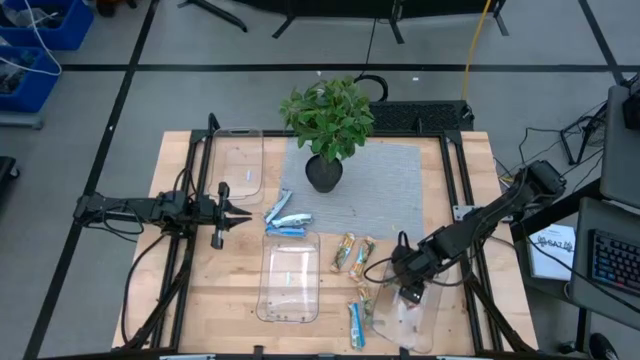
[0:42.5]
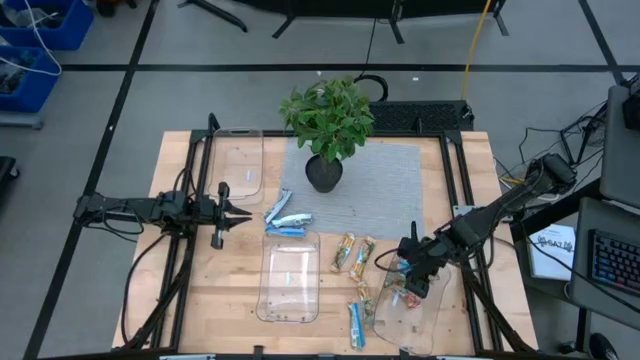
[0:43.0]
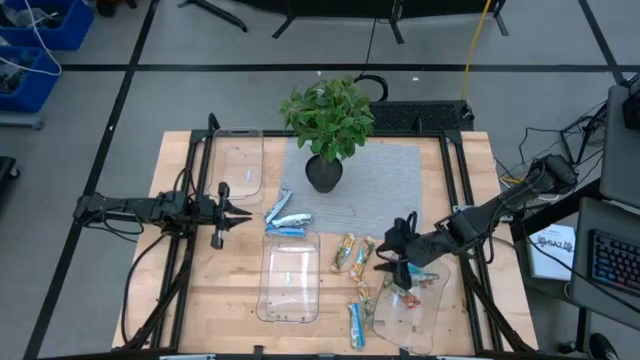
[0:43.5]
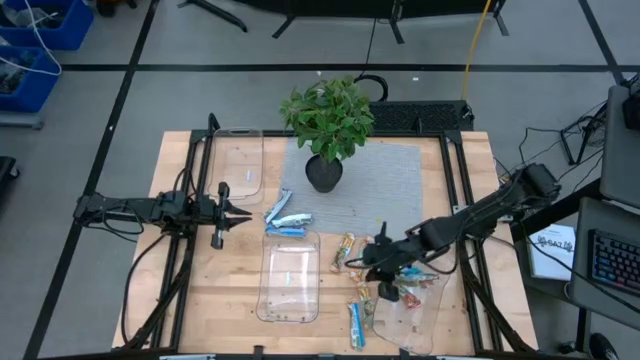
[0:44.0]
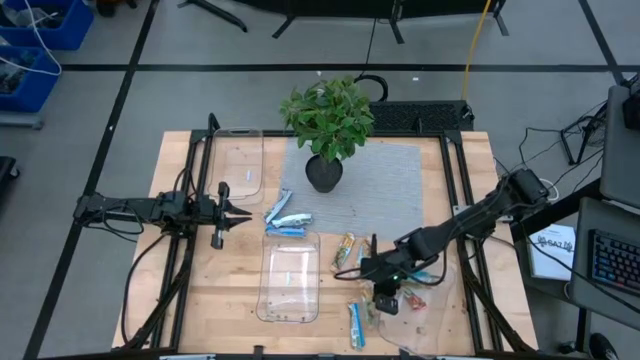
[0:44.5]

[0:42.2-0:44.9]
Task: Pick and place Granola Bars by type
Adjust the bottom right transparent bin on the table

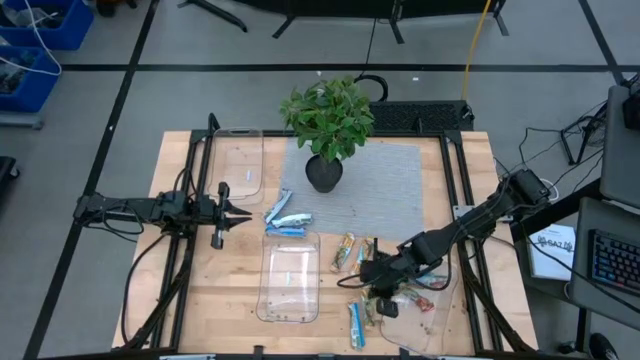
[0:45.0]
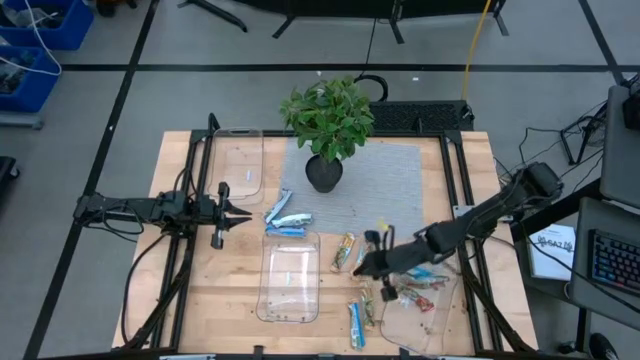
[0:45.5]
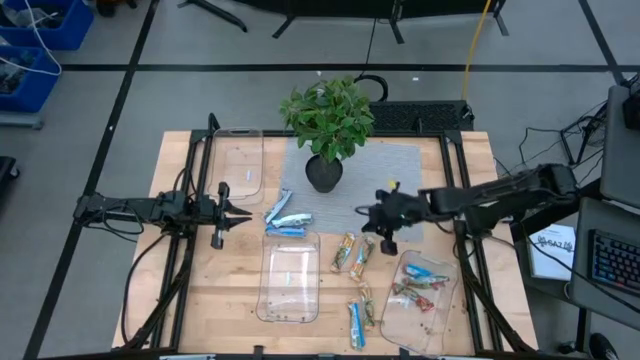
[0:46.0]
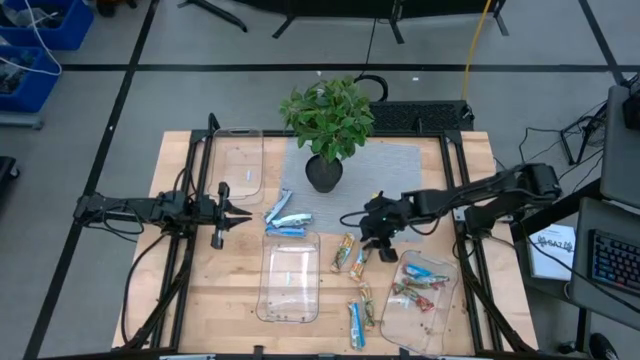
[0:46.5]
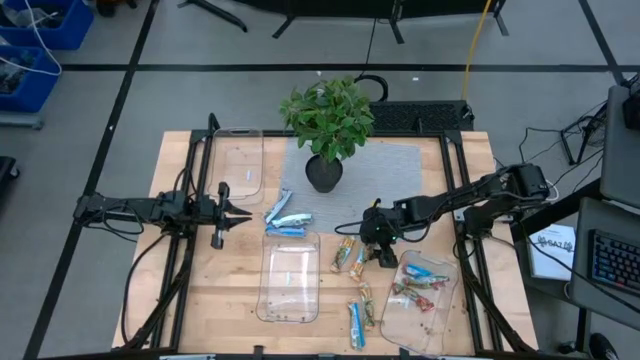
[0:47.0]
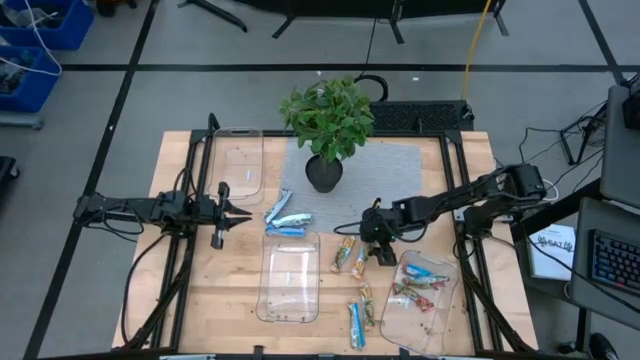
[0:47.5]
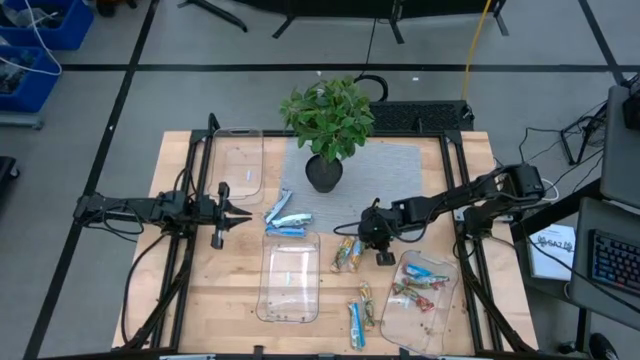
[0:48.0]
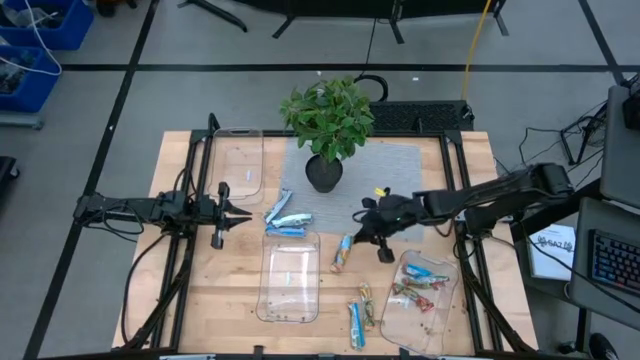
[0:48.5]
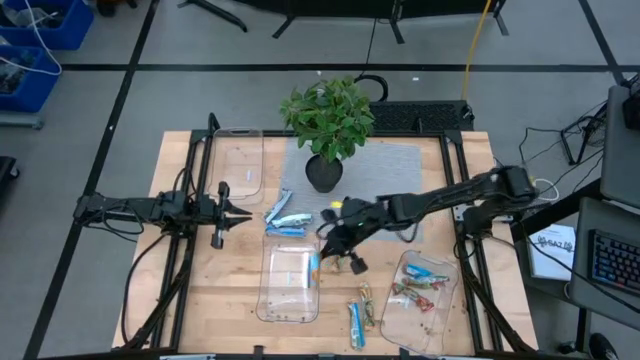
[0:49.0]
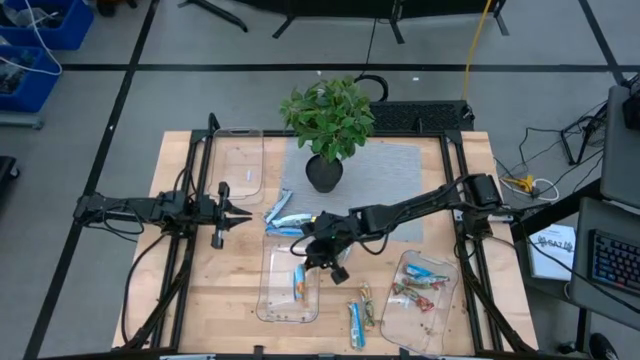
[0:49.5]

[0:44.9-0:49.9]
Put the yellow granola bar into the bottom left transparent bin

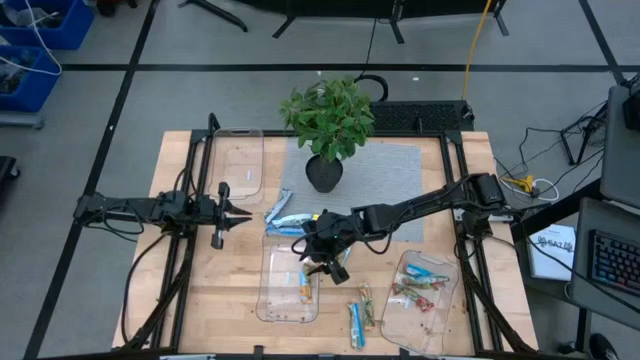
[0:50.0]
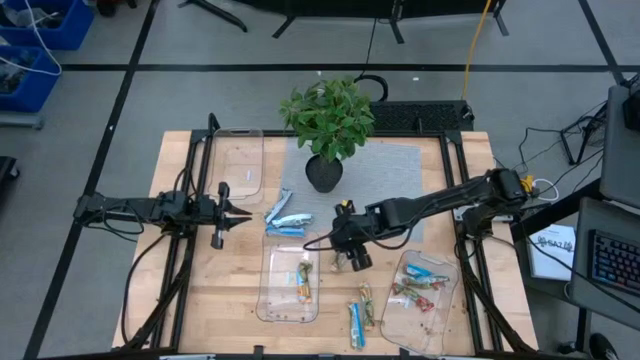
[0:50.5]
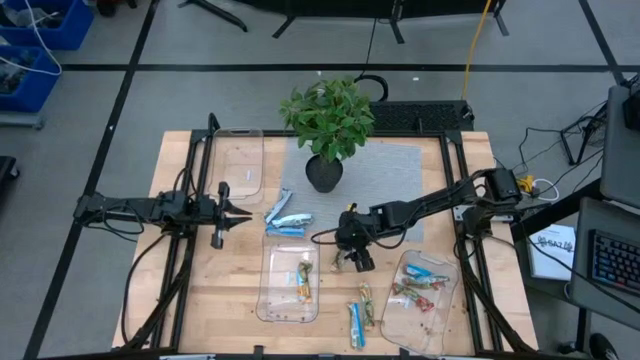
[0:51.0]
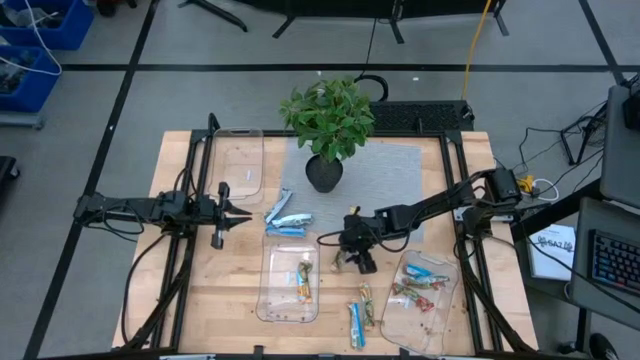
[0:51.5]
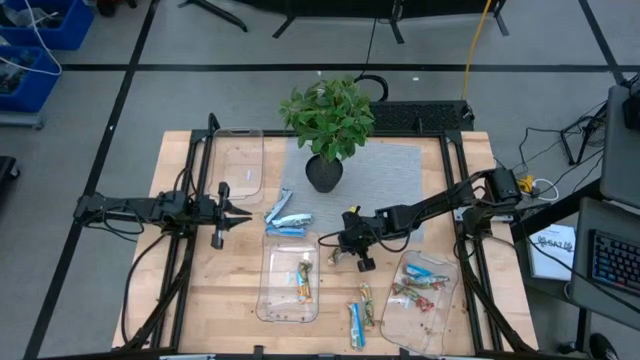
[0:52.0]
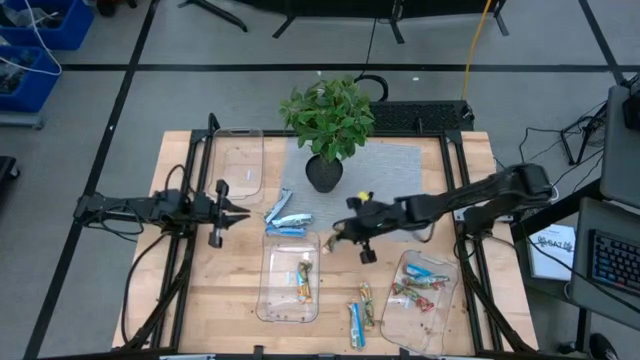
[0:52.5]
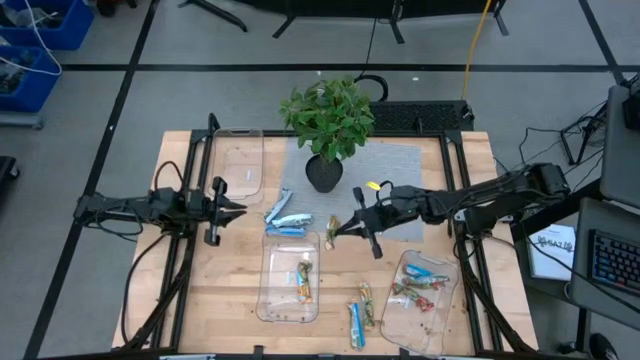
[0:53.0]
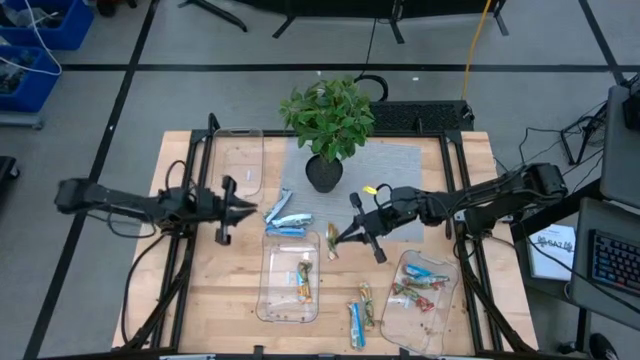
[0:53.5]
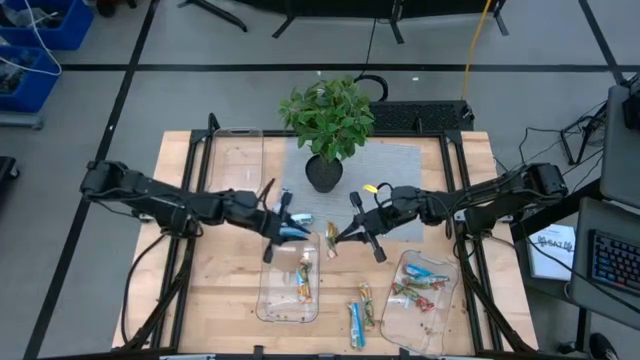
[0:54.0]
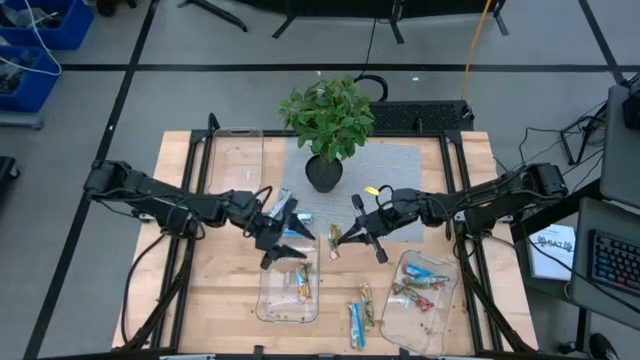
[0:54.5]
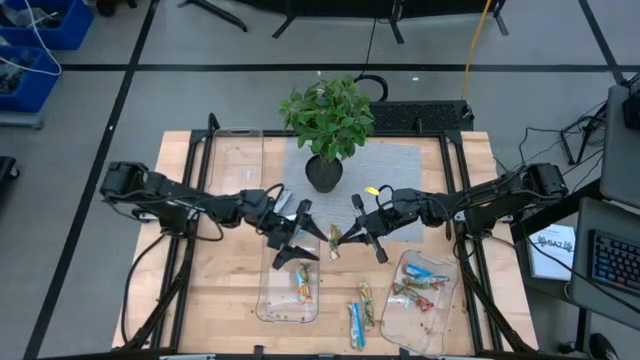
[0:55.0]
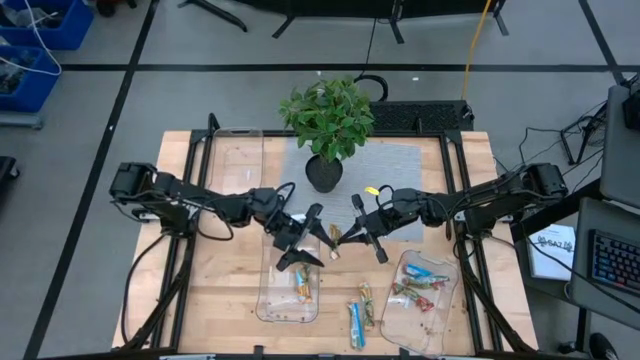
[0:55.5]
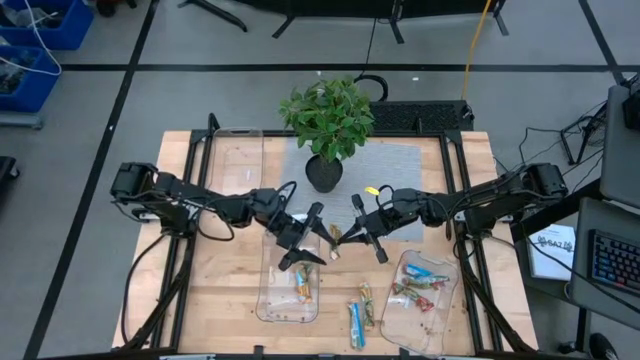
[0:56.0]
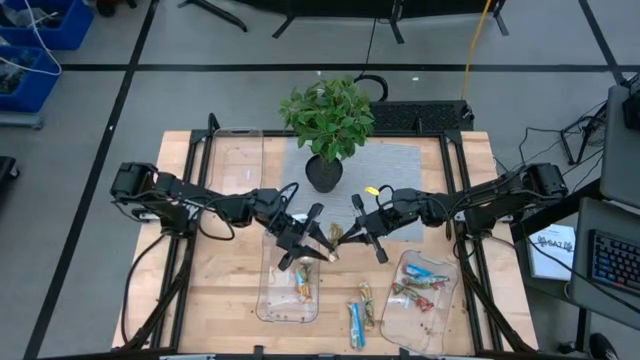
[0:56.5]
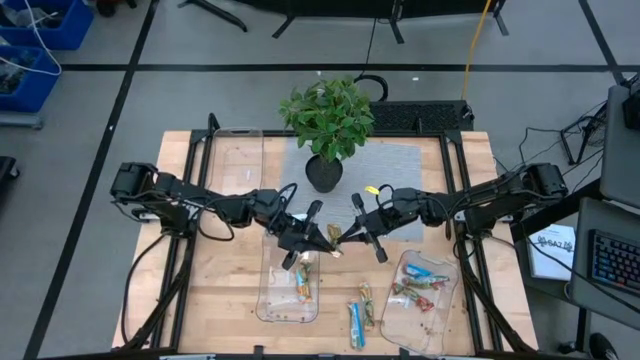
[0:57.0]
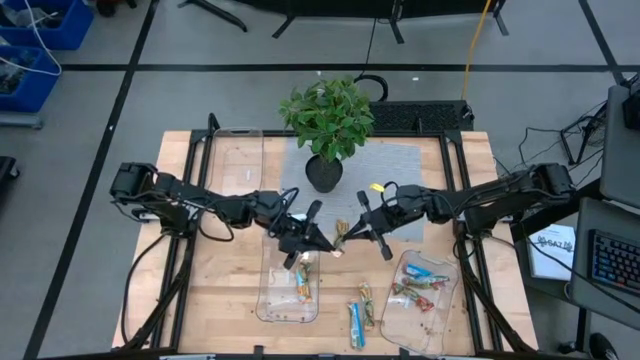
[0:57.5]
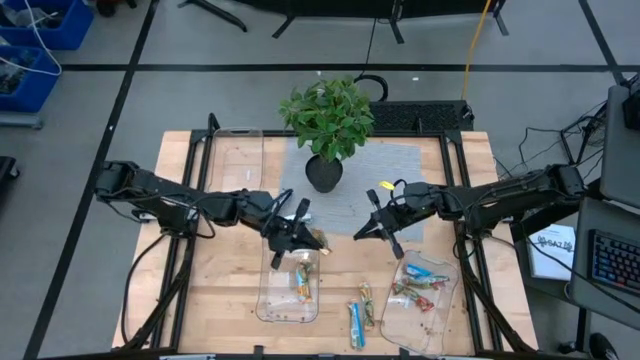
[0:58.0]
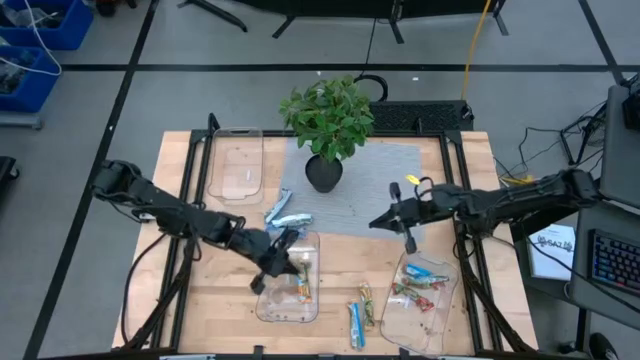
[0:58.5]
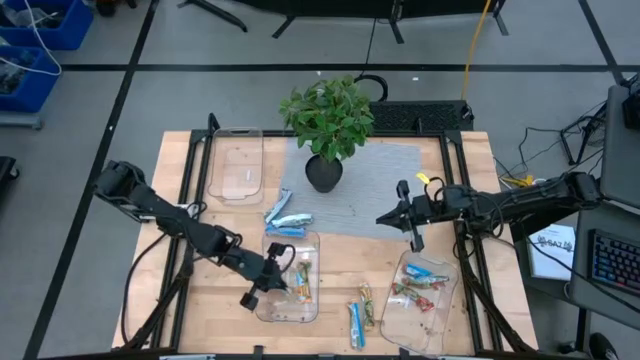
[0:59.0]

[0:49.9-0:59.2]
Put the yellow granola bar into the bottom left transparent bin

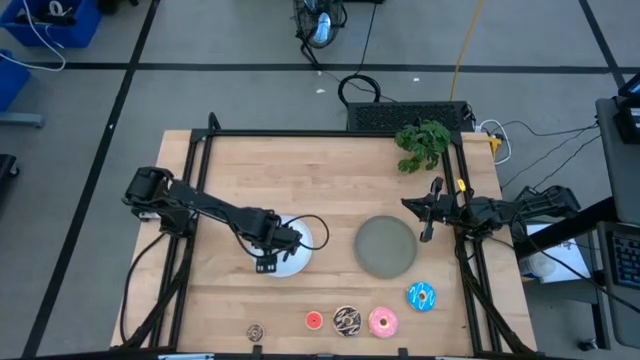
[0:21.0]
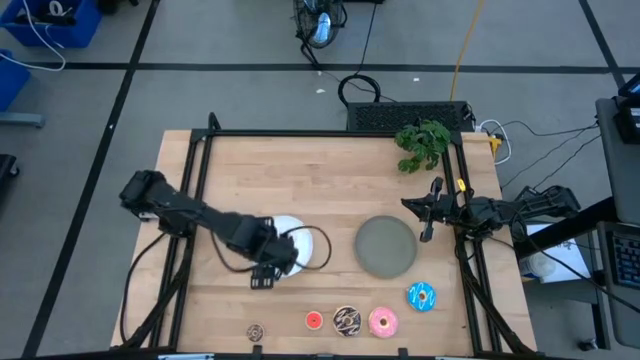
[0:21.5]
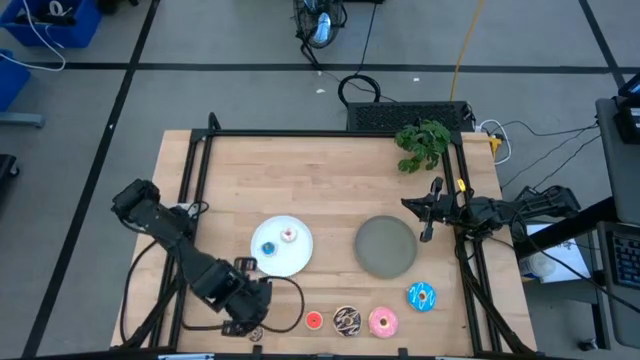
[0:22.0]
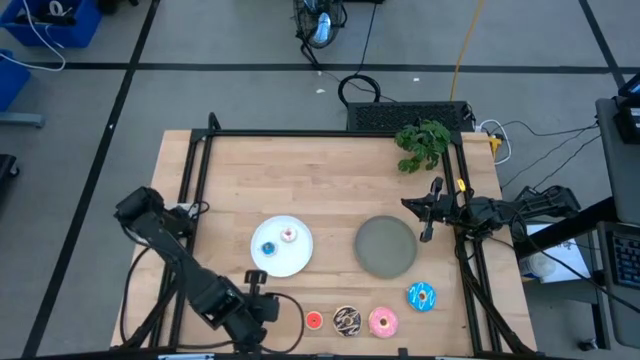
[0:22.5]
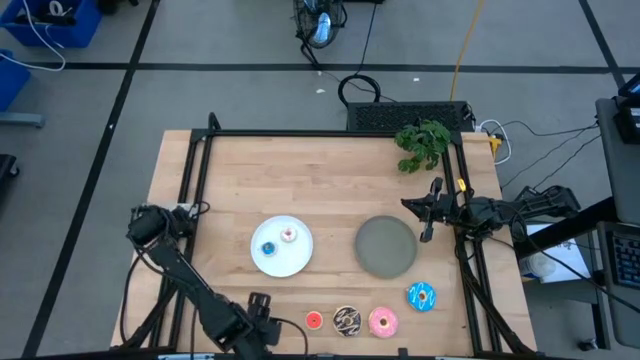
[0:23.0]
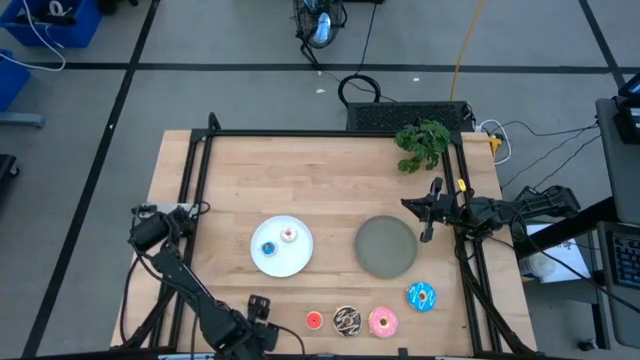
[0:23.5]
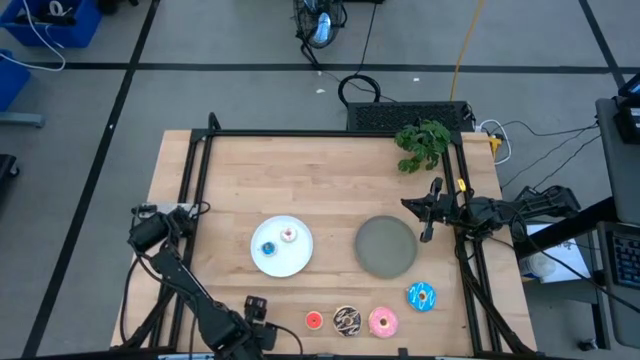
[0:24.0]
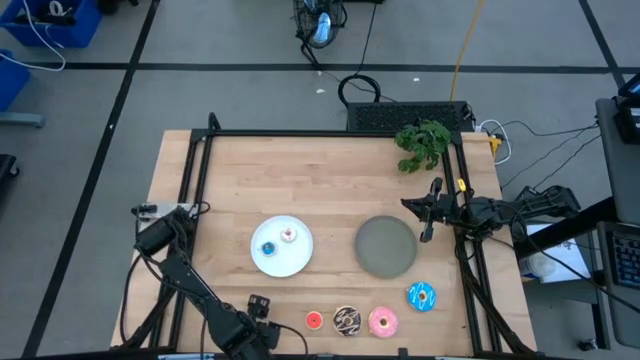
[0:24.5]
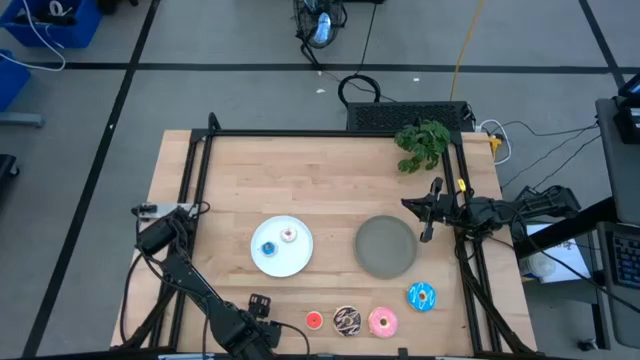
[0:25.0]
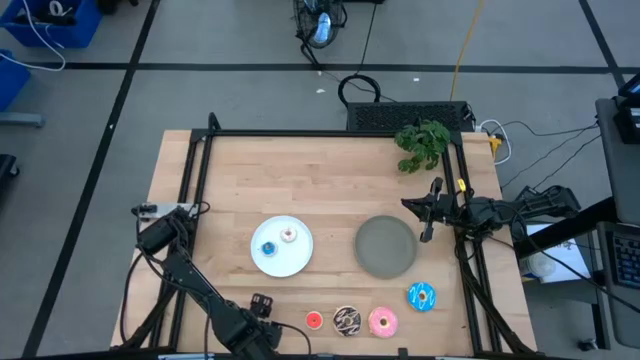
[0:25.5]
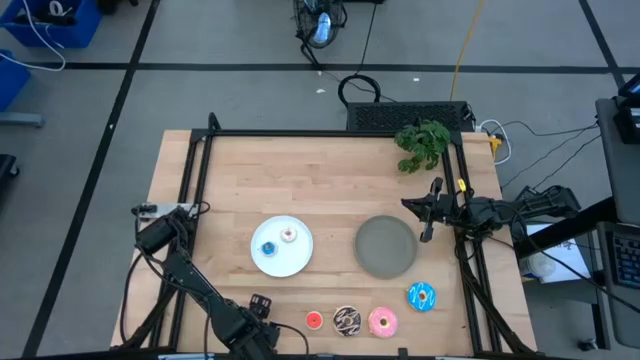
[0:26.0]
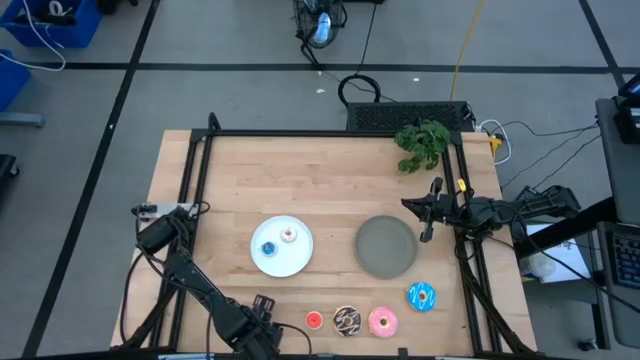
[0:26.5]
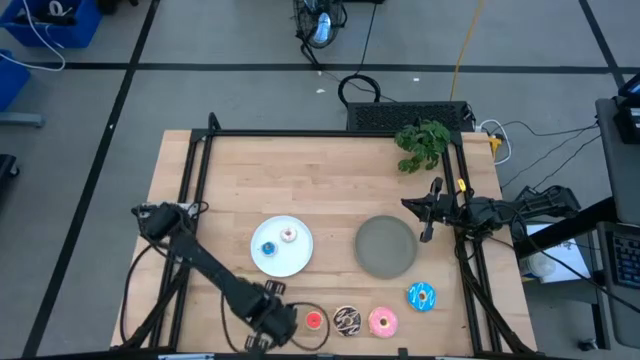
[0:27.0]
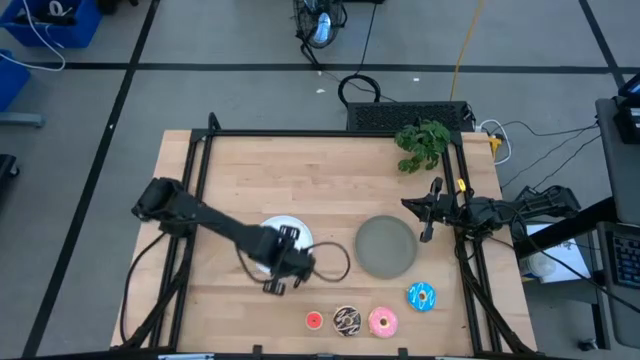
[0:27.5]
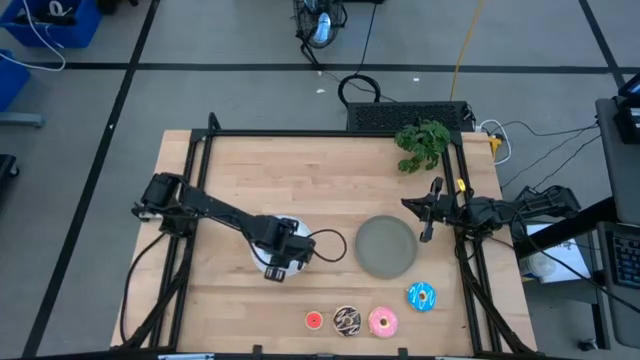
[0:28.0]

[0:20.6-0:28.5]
Task: Pick & Place donuts
Put the small brown donut on the white plate
